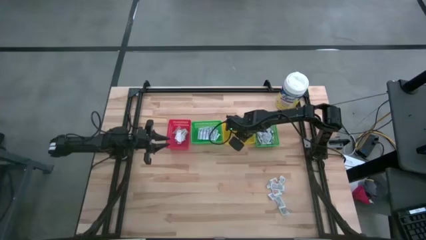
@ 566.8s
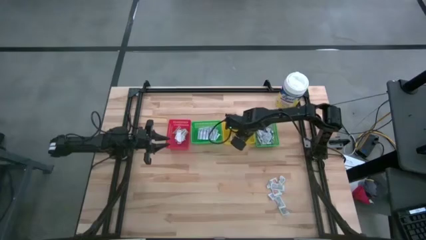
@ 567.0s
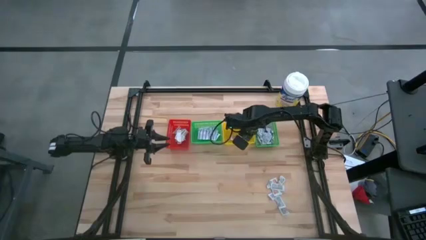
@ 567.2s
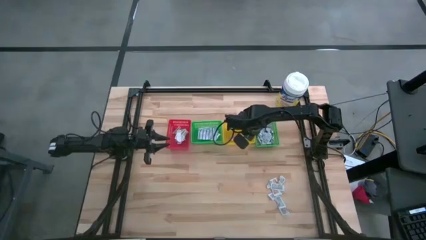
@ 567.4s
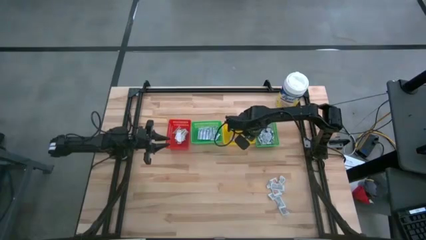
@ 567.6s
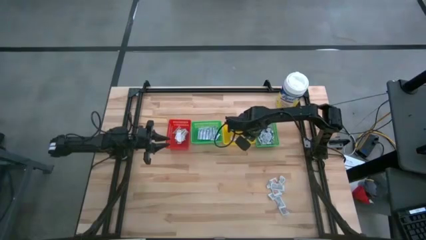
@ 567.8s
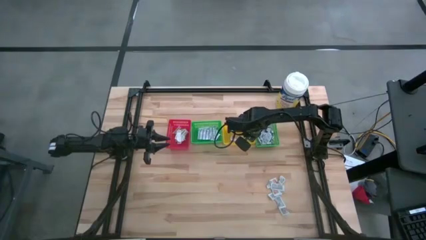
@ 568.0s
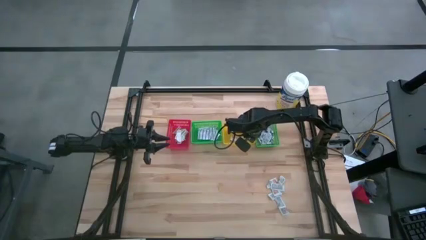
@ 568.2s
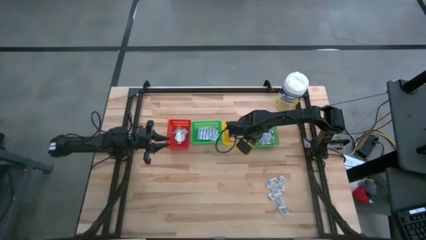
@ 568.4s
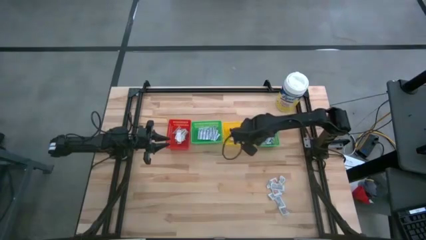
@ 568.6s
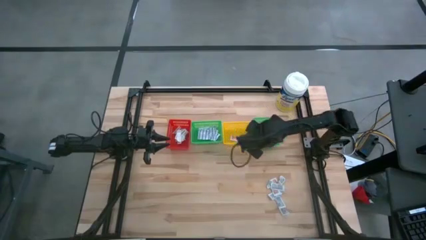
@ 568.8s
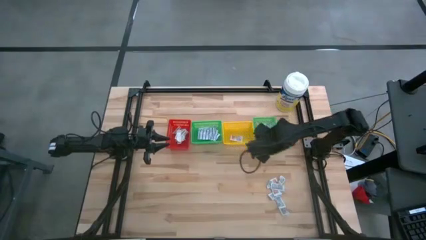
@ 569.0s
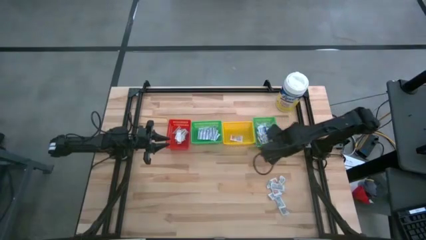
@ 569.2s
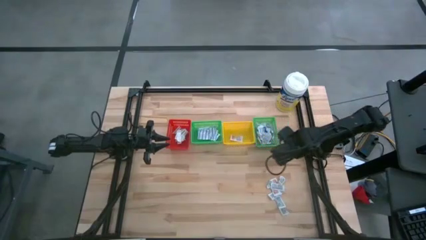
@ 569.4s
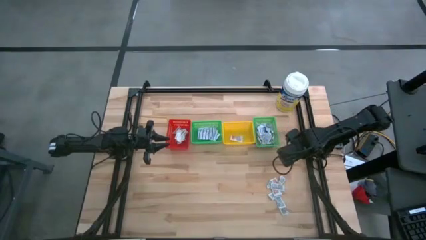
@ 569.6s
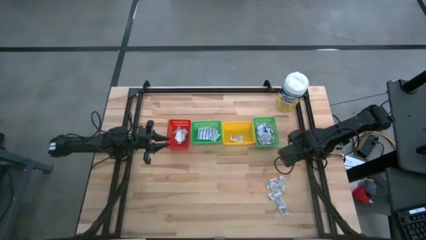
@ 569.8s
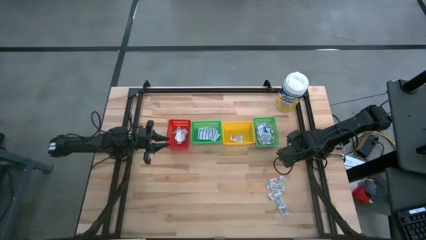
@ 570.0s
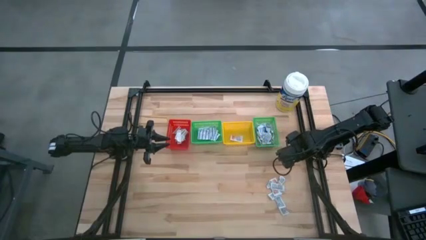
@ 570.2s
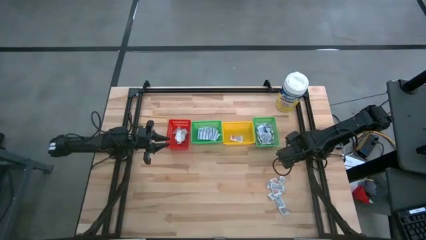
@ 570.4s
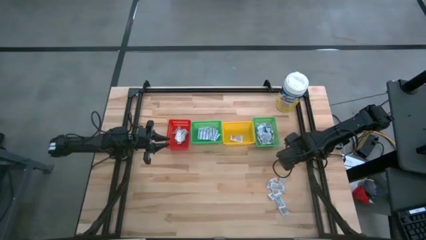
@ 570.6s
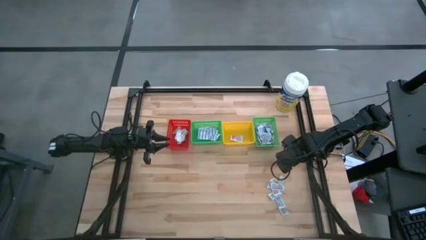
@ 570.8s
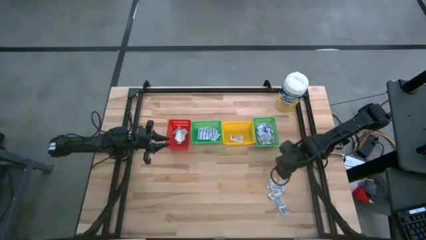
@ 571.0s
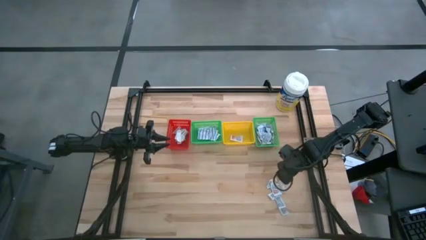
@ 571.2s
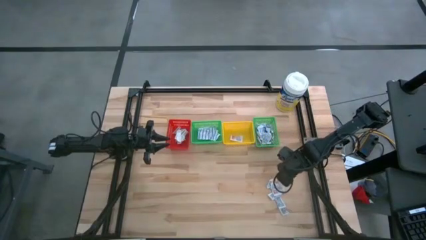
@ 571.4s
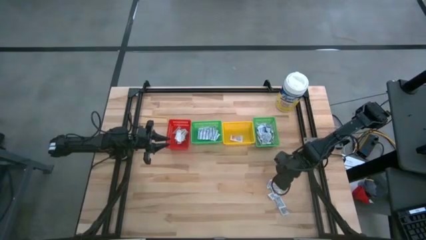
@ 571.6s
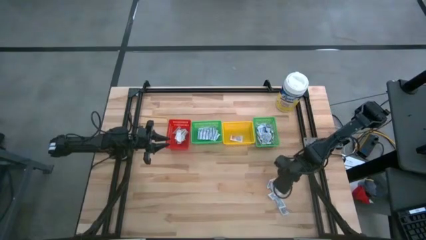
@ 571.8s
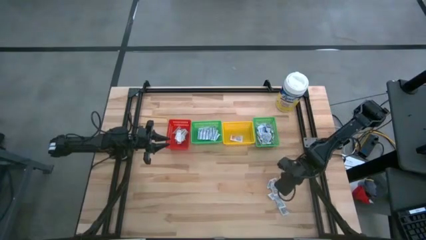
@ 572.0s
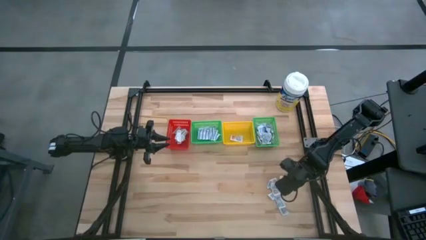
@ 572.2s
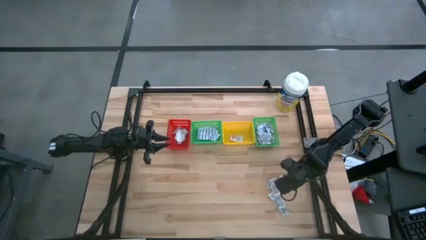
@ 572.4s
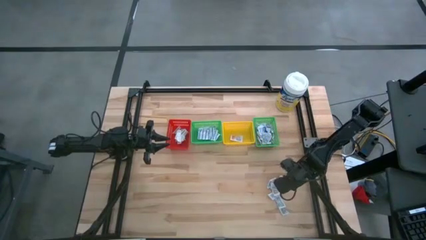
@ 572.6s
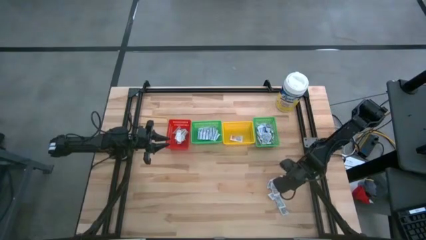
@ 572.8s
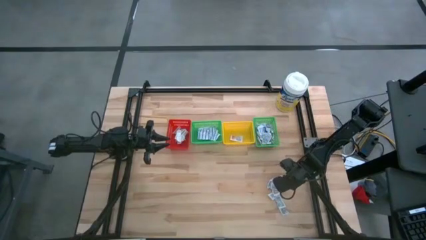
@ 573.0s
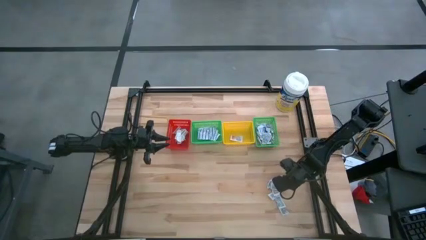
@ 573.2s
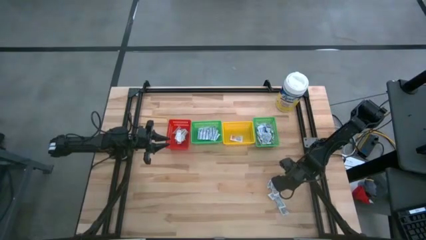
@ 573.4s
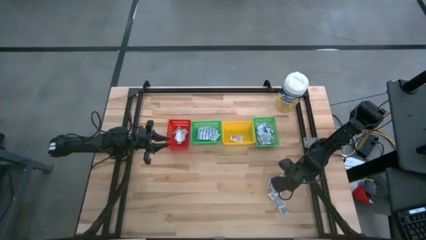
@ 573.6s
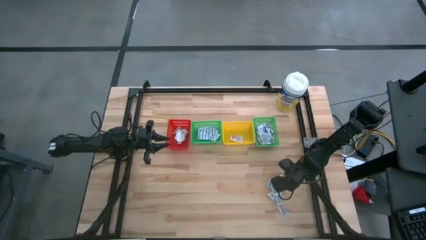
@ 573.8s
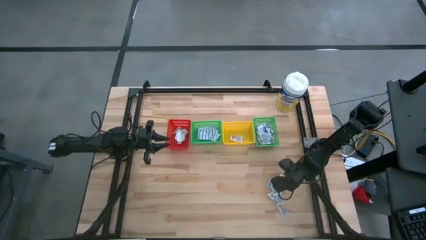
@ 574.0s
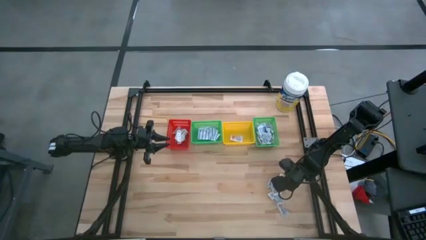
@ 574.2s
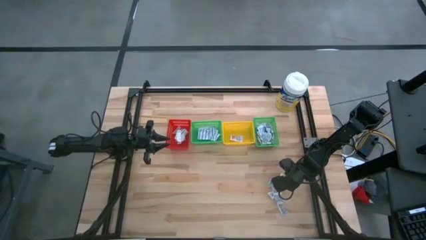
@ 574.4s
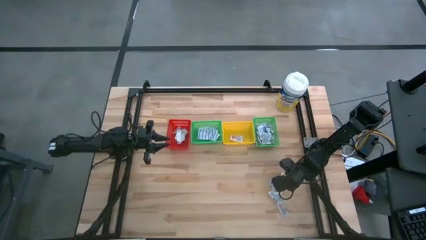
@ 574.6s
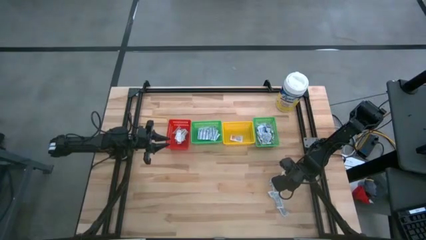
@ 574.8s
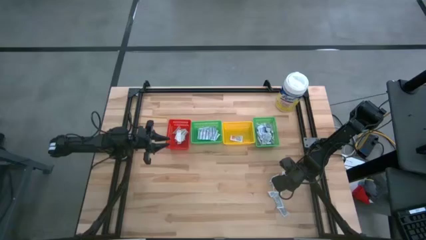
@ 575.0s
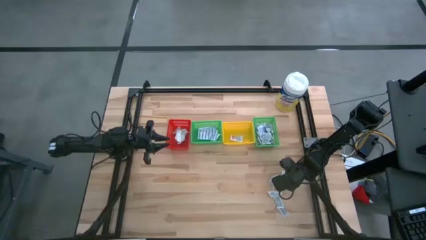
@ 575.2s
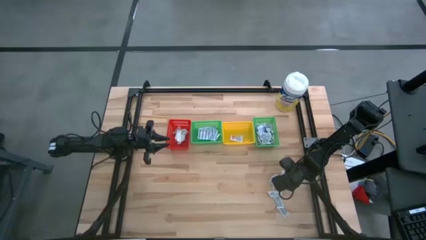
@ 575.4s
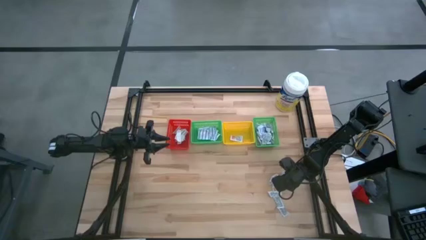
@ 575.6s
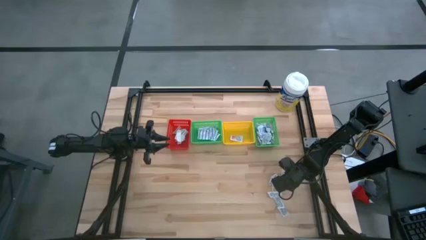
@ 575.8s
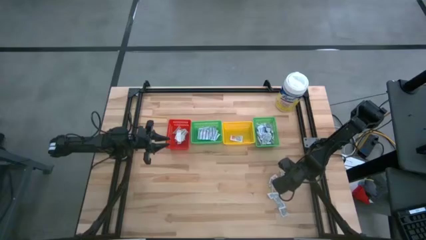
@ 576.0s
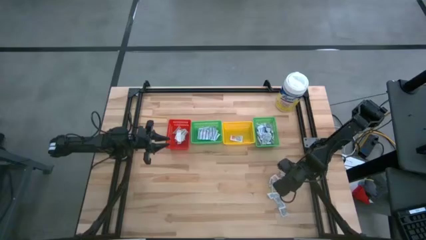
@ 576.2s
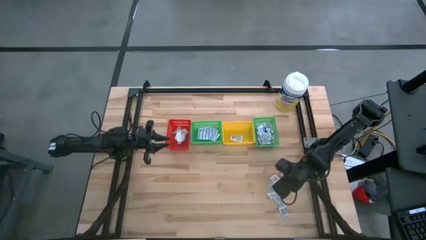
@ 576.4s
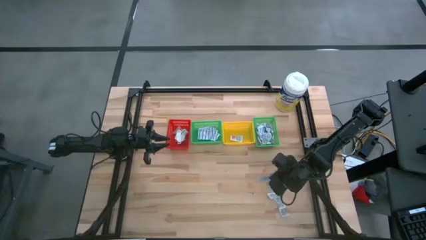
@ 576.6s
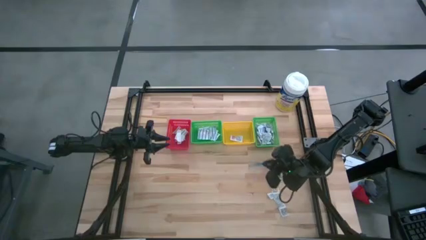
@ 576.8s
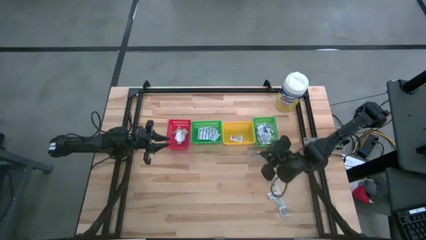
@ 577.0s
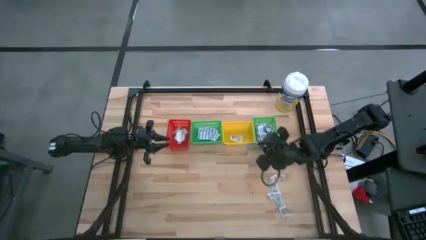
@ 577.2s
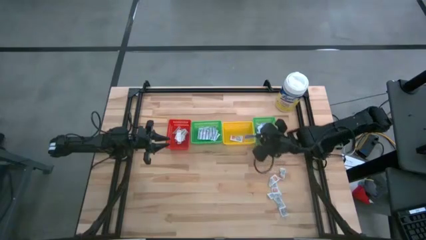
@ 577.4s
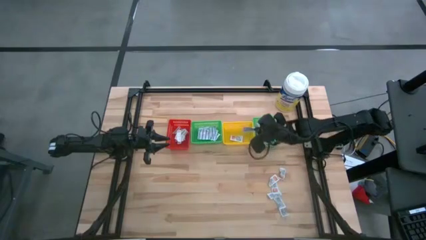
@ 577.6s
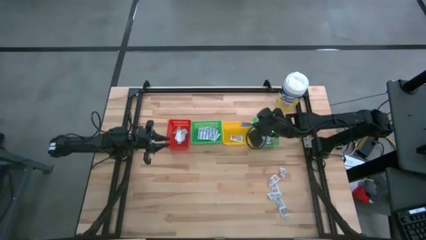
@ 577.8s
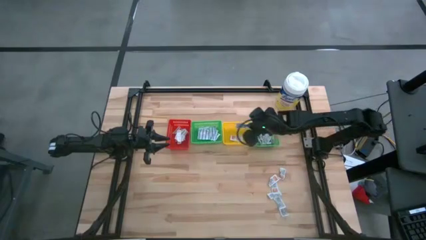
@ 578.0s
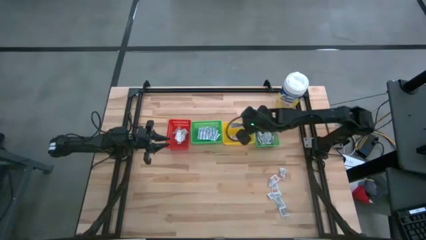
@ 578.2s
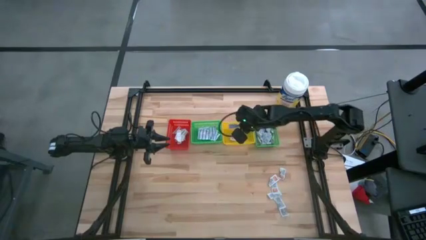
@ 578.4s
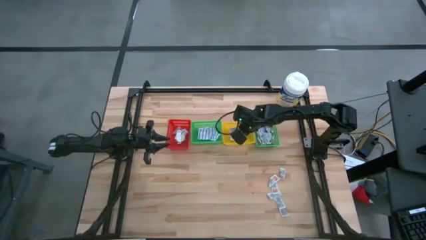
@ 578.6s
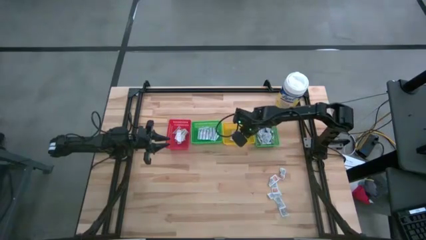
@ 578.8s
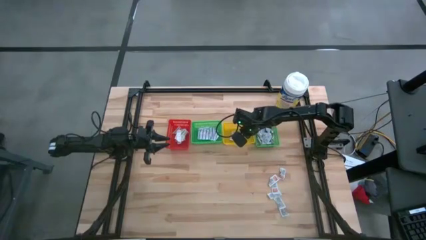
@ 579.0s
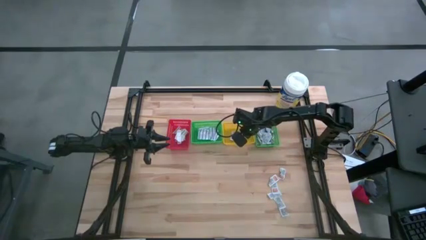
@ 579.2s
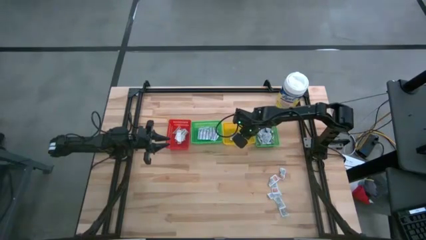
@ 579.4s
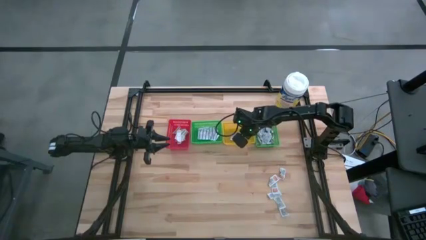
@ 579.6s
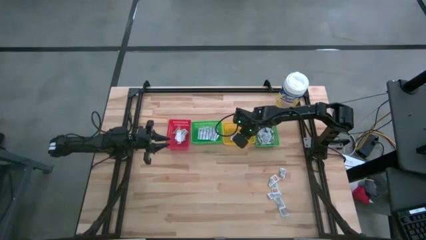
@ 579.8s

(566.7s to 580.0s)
Task: Pick & Place First Aid Supplies
Put the orange ointment pack into the yellow bin
